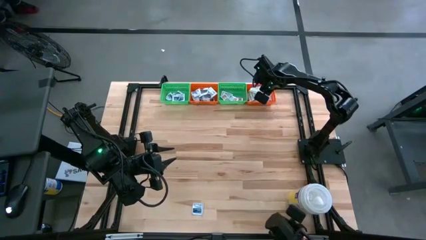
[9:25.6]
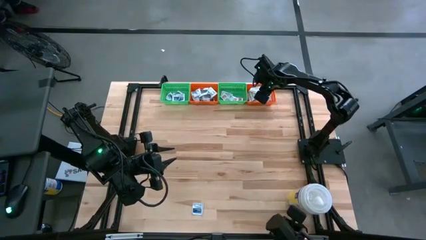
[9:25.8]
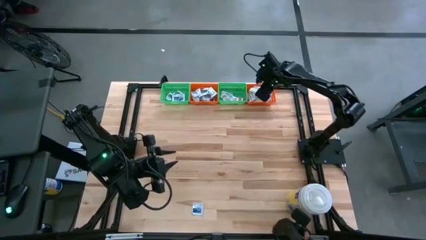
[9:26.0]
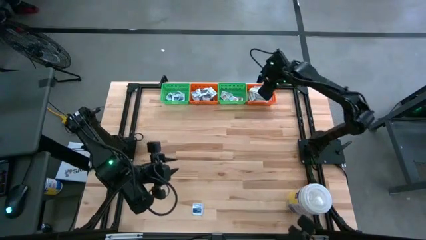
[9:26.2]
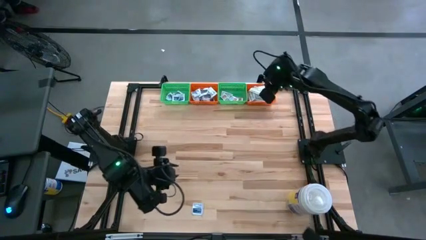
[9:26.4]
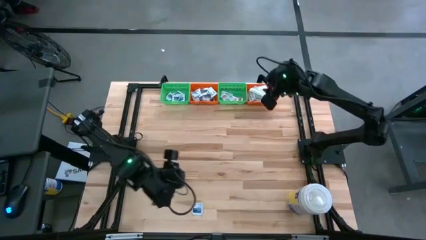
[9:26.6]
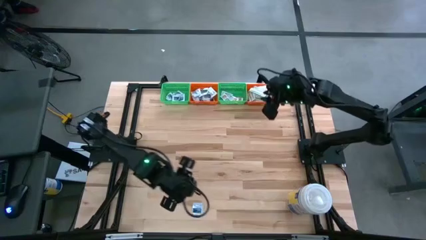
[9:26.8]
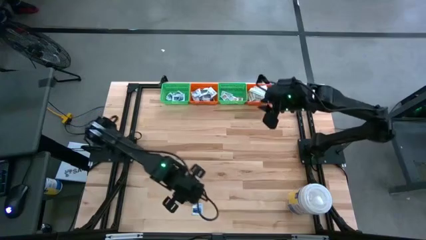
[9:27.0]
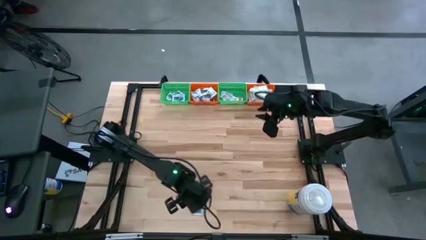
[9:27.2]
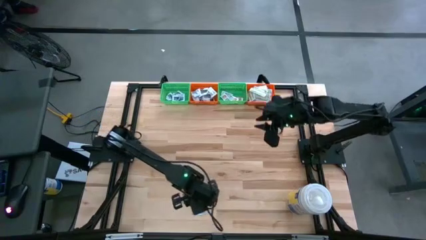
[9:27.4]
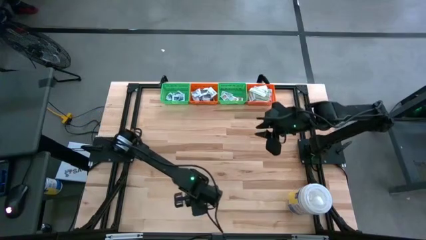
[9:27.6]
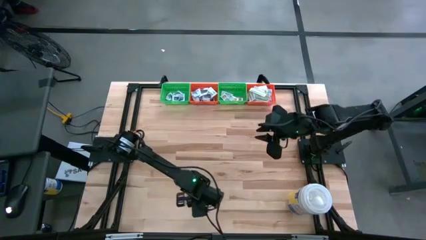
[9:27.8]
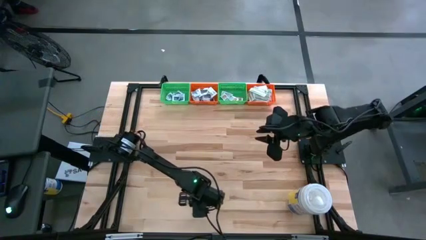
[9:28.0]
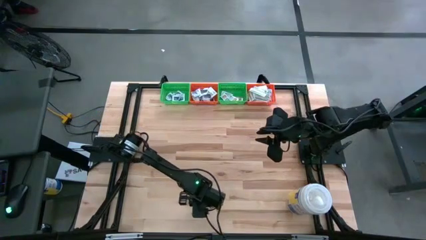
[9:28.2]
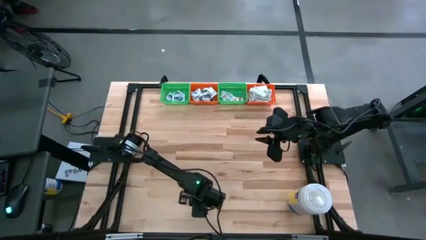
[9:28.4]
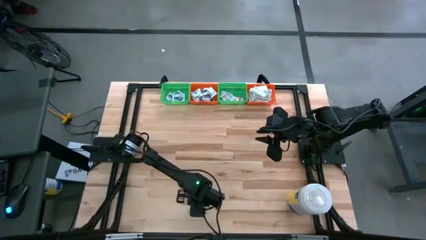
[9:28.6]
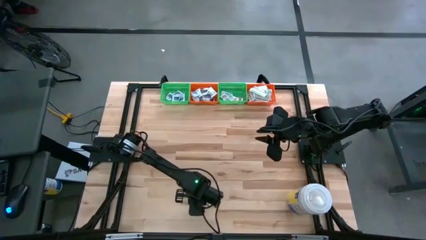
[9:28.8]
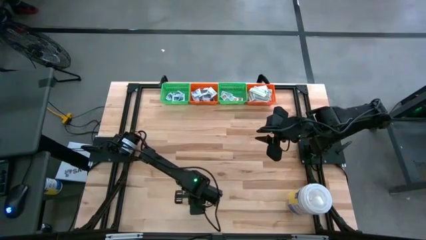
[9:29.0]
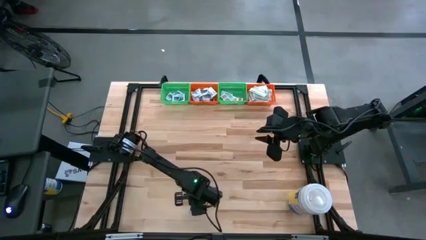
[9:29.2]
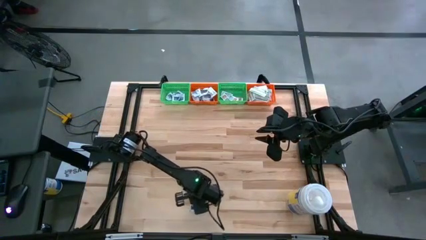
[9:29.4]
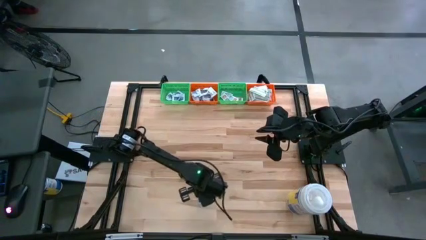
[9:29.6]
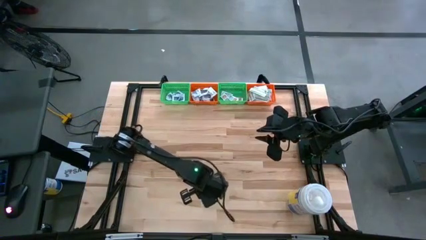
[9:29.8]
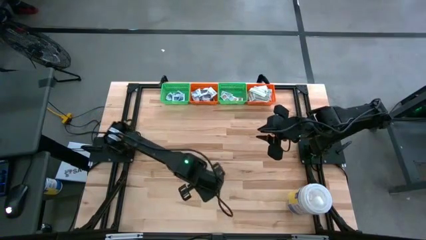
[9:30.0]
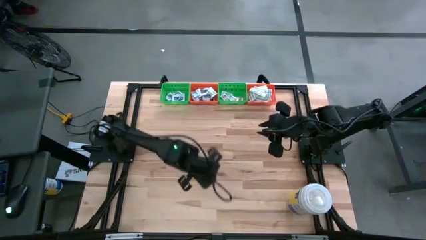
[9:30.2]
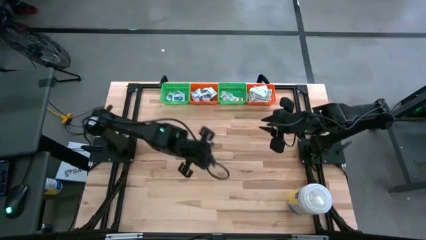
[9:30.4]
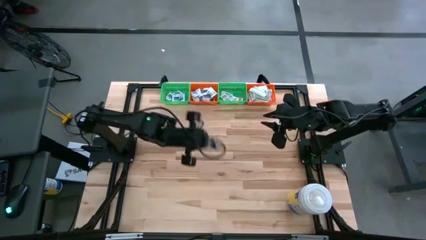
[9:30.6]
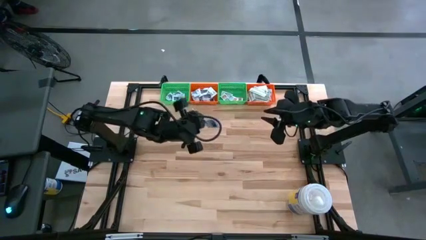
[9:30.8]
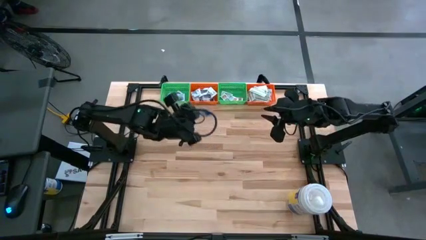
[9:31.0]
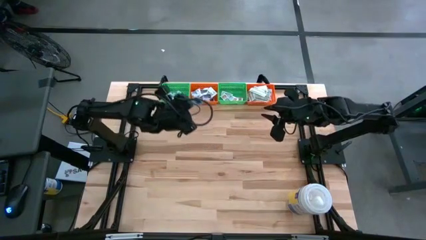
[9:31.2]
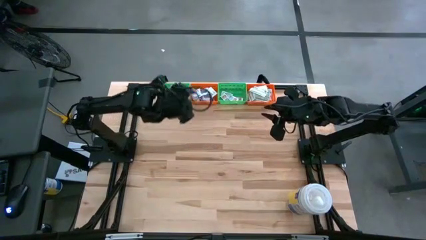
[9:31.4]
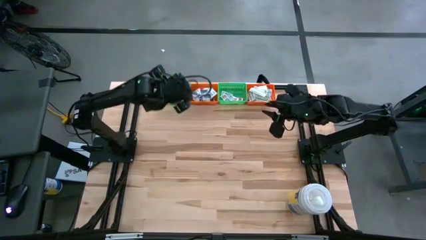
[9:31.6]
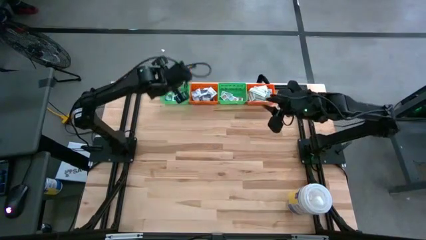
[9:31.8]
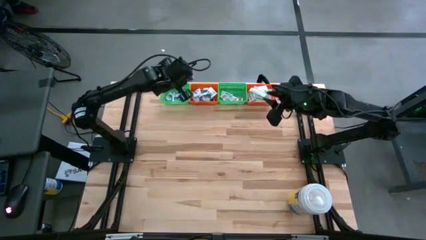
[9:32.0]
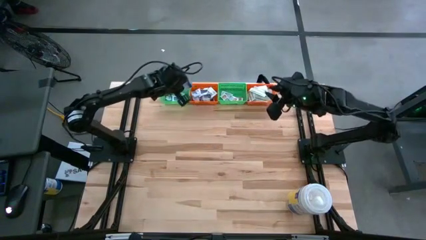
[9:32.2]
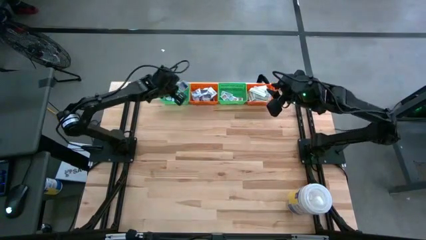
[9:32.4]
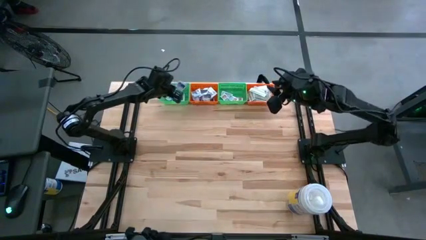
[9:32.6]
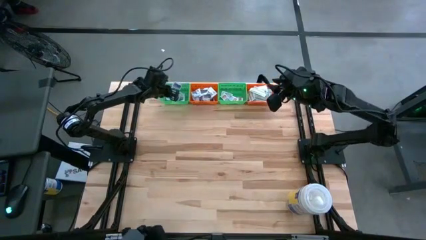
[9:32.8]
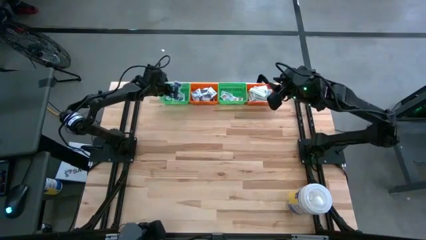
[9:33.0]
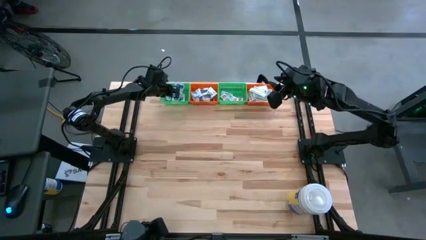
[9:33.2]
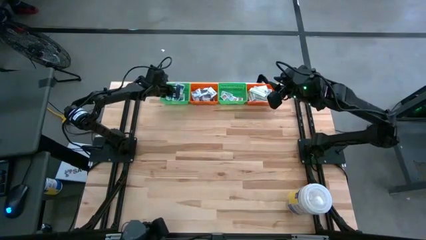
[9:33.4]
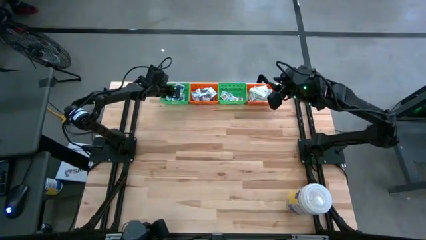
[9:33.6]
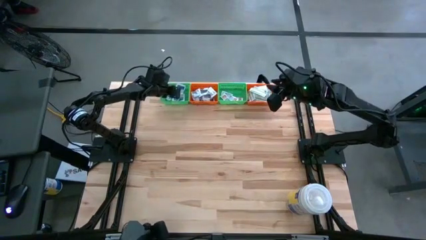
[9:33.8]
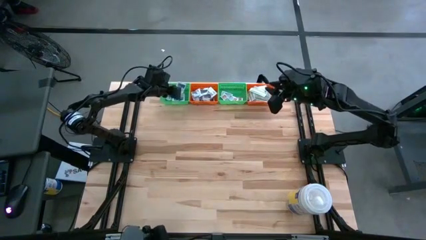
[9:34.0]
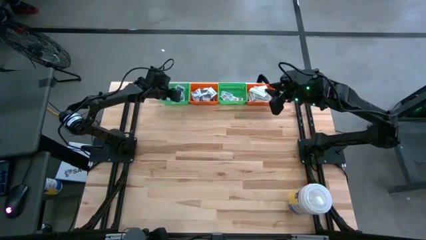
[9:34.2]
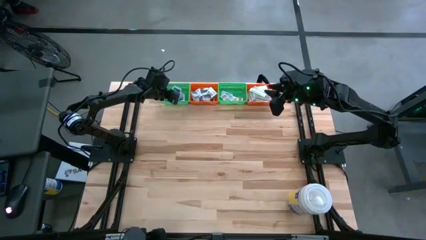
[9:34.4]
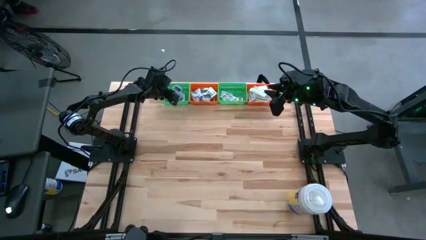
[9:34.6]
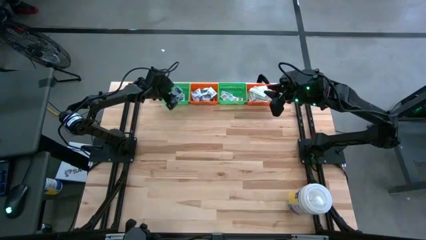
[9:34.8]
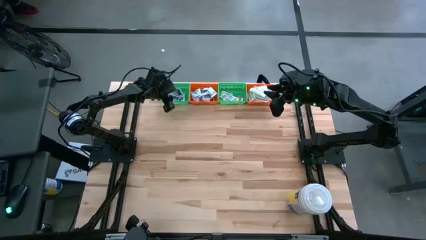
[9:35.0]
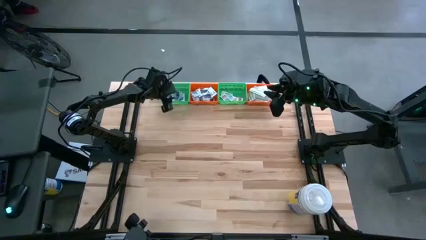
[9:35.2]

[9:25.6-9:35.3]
Task: Pick & Place First Aid Supplies
Put the blue alcohol pad in the left green bin

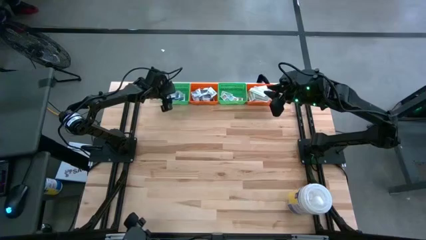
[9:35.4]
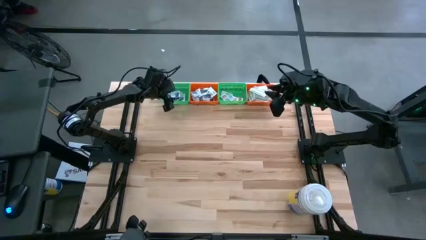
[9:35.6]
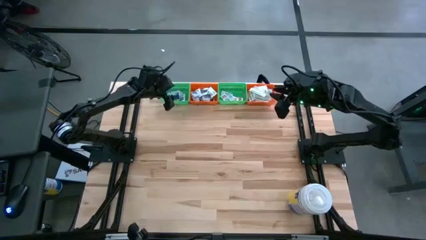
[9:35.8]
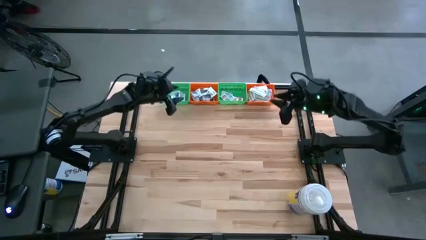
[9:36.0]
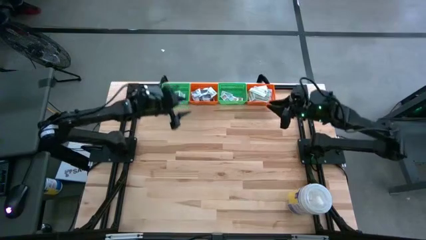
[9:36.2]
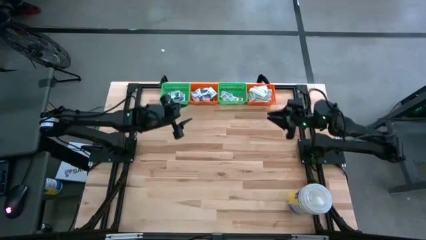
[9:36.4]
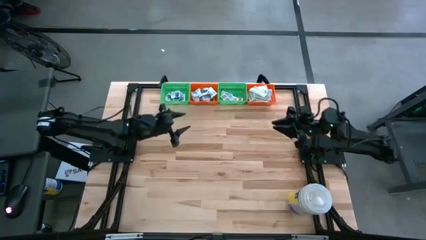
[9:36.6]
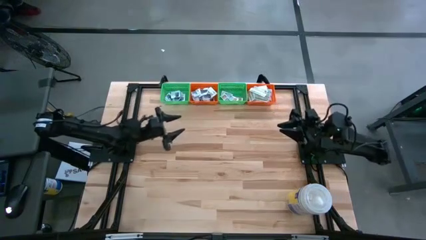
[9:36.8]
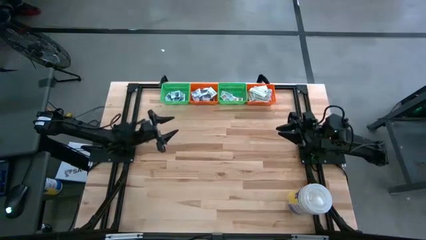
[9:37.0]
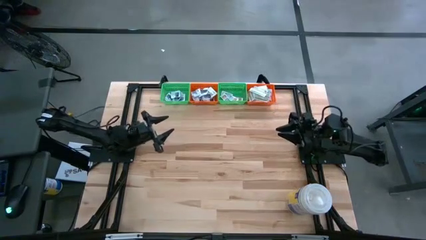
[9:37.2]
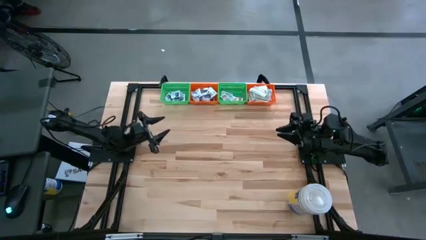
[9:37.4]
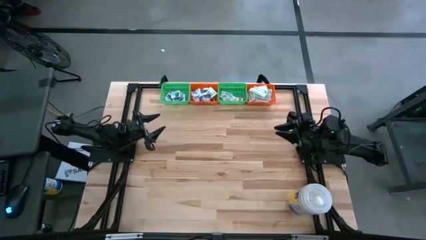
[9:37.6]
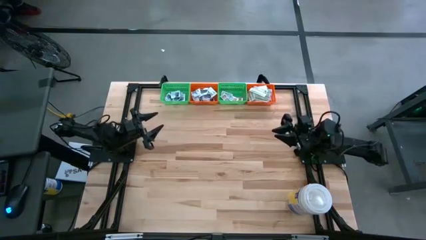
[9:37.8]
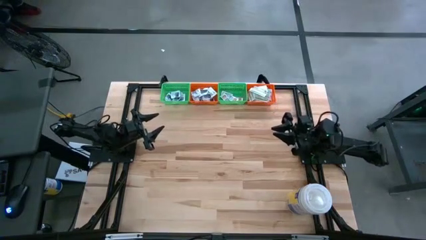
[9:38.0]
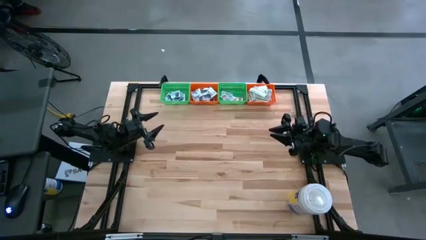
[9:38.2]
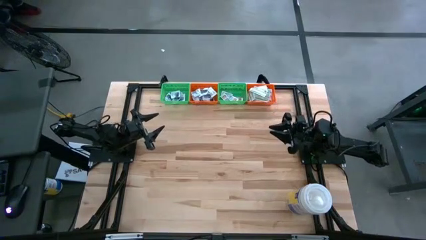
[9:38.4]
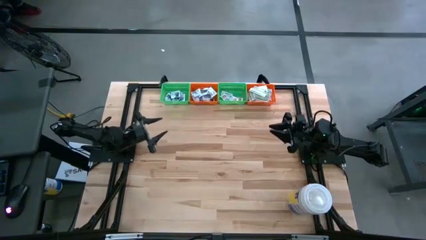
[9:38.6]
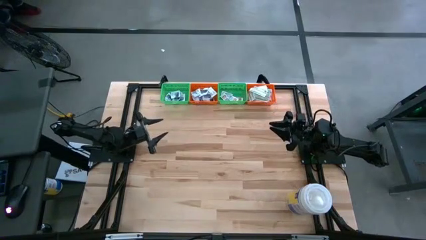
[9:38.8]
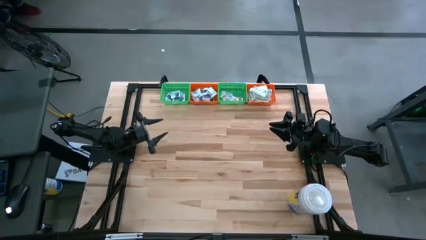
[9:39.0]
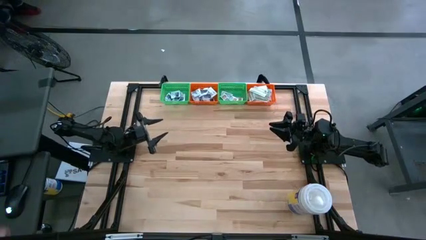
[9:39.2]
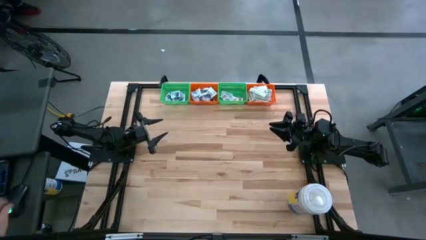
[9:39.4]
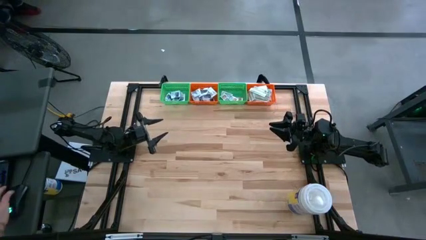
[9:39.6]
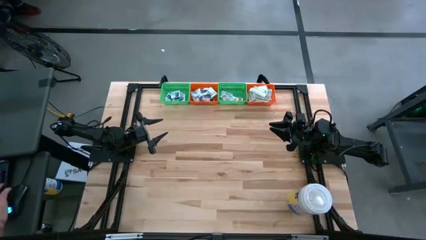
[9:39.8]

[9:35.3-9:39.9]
Return to Home Position
